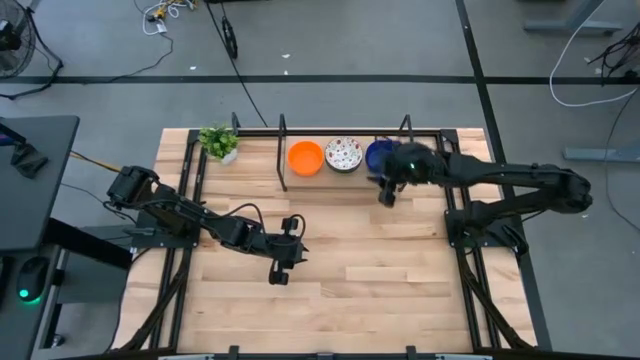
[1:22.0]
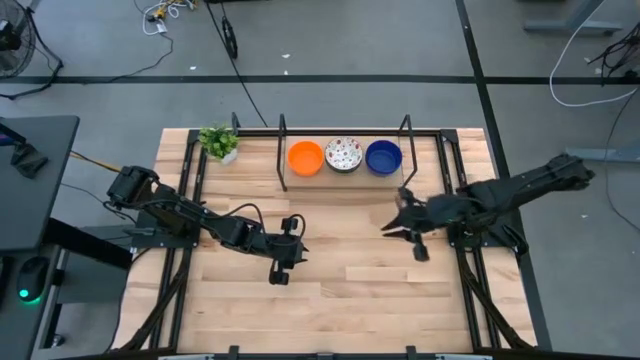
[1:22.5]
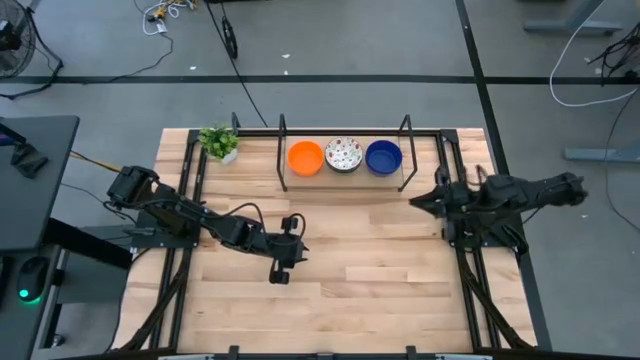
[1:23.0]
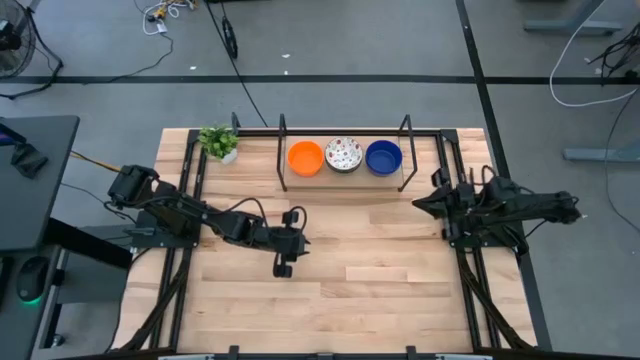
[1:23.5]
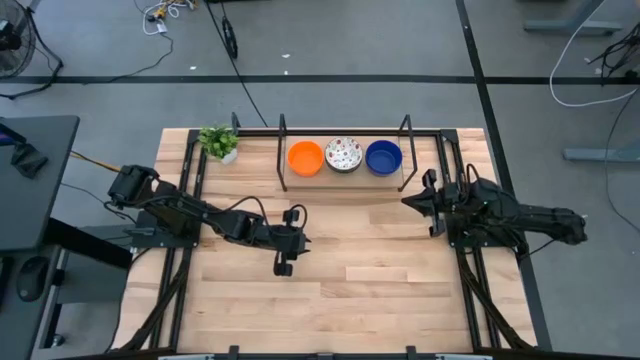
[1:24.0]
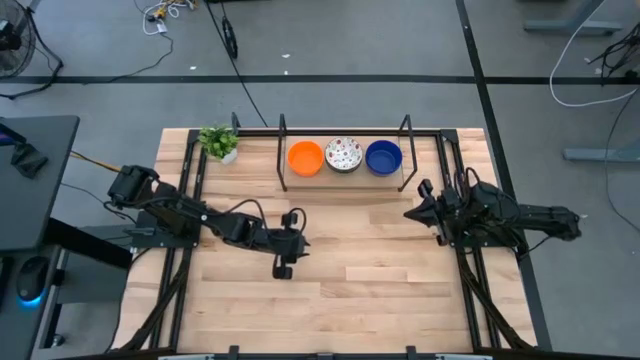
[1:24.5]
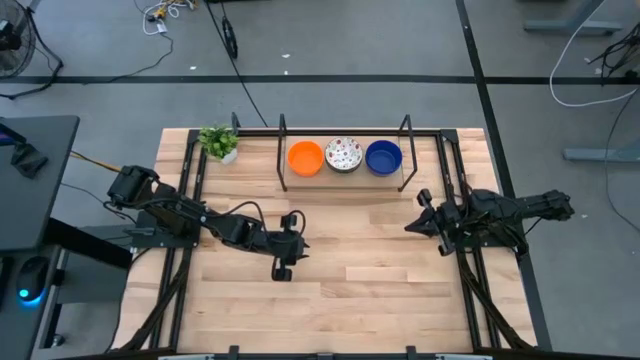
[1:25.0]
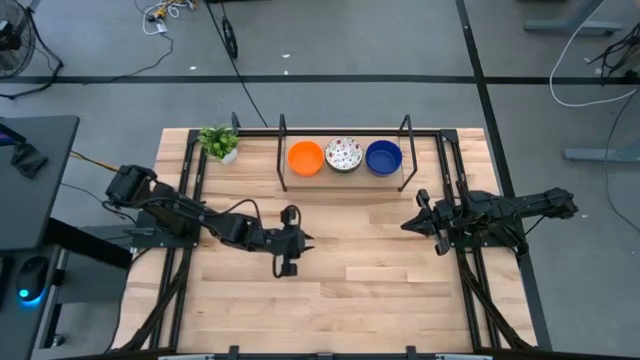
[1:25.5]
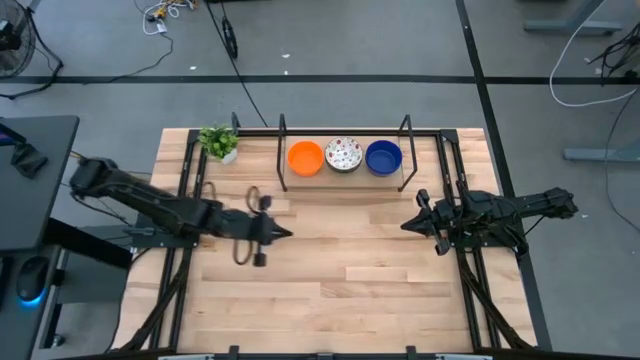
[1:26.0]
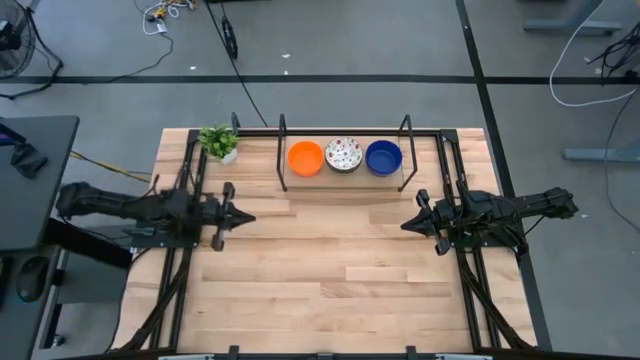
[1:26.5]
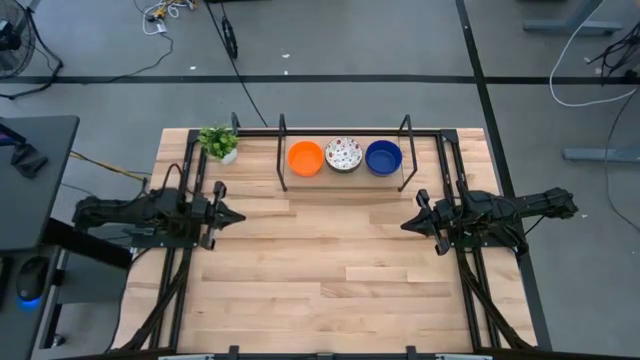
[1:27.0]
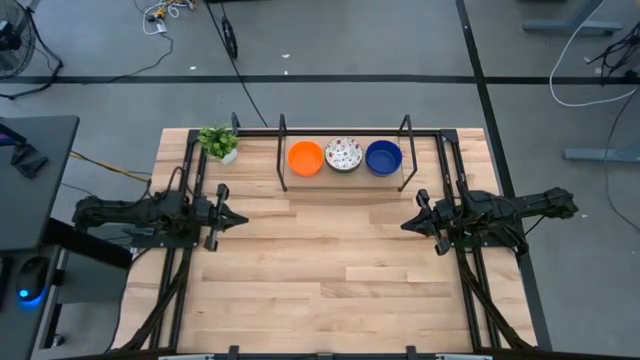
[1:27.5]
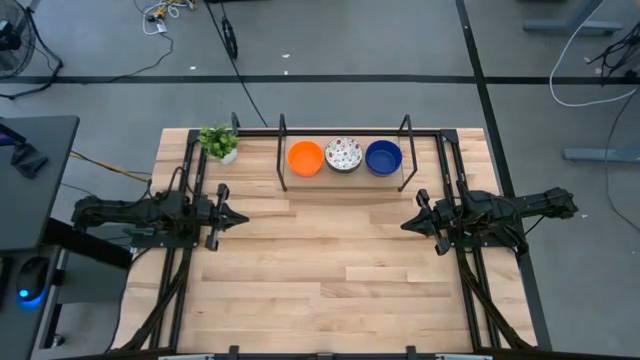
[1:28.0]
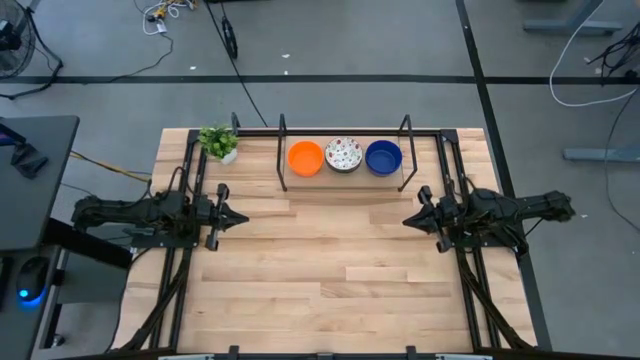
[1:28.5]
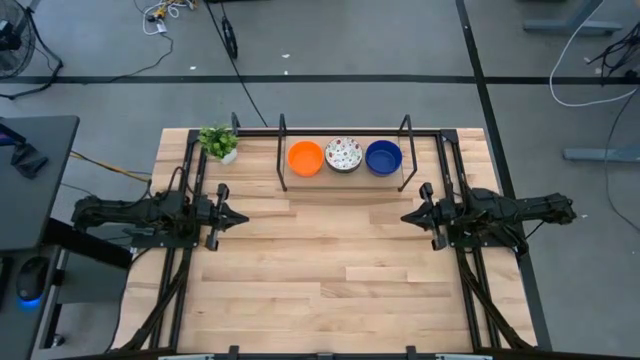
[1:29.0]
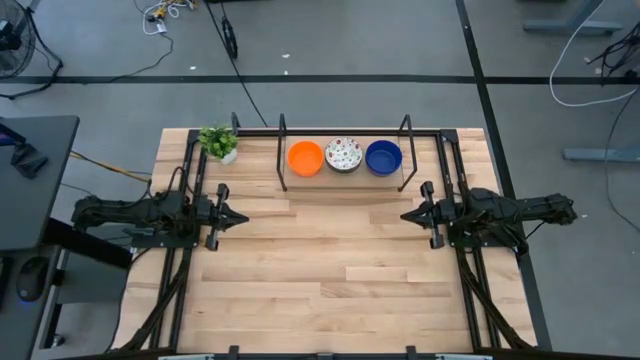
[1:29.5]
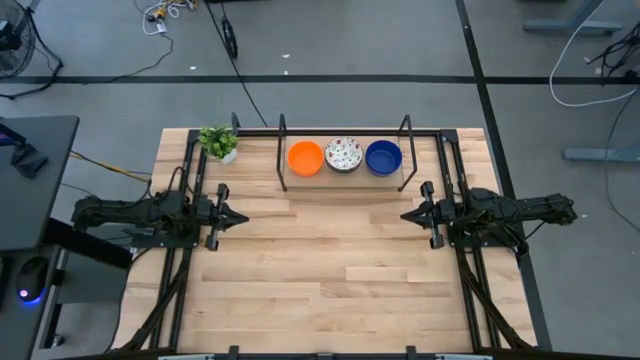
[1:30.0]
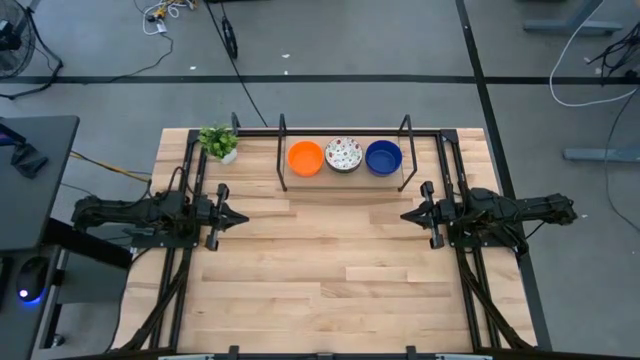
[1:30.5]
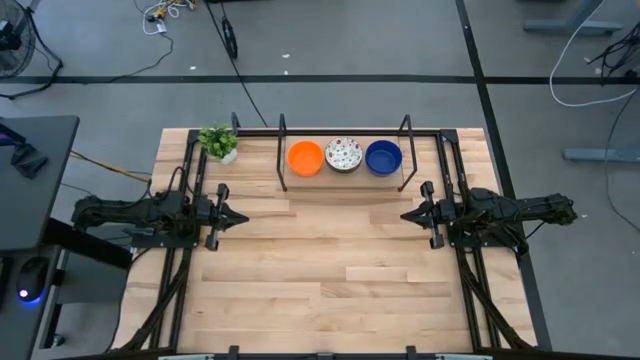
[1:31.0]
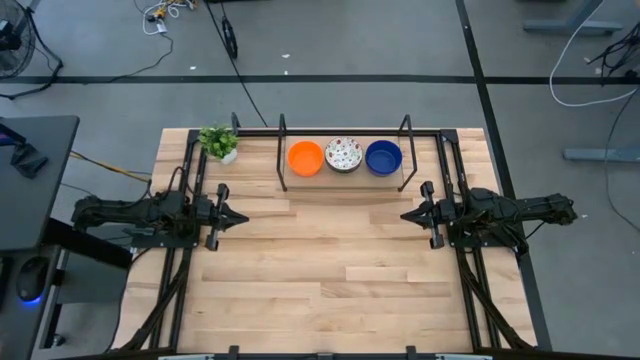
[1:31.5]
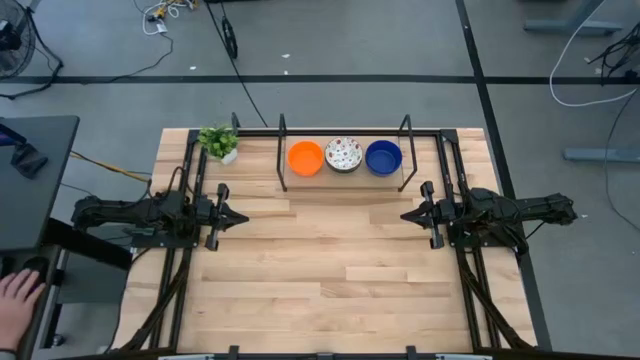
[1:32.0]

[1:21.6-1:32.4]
Task: Pick & Place Mini bowls
Return to Home Position

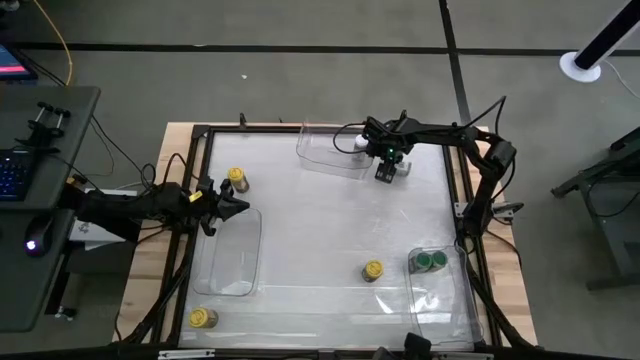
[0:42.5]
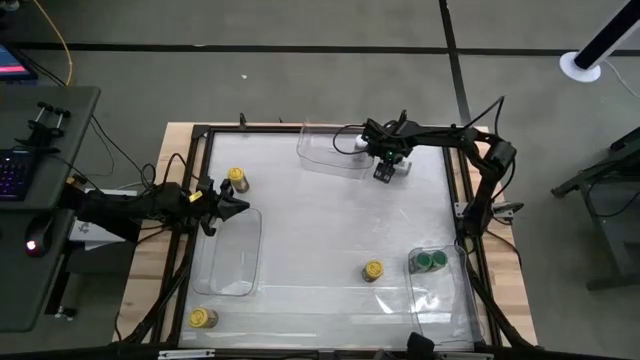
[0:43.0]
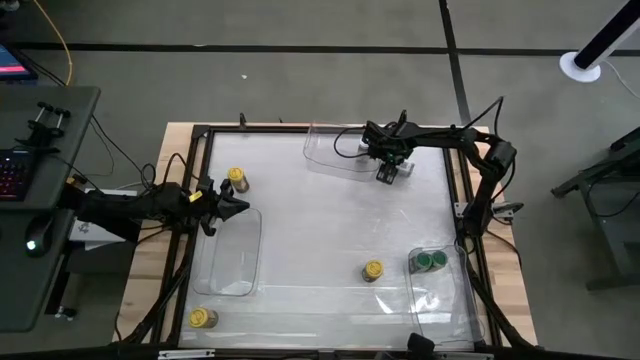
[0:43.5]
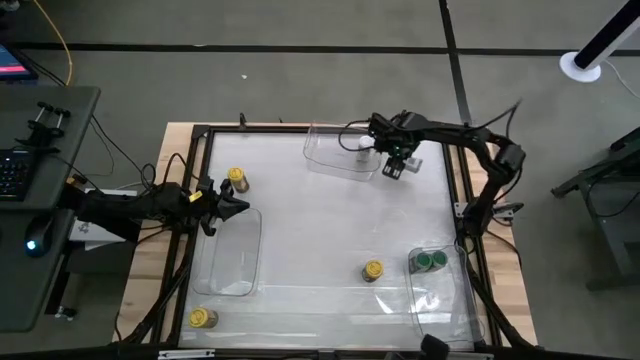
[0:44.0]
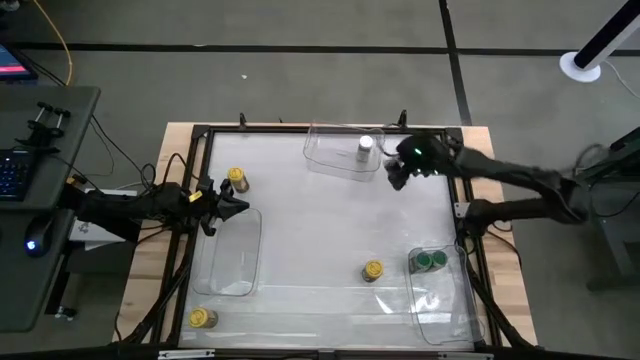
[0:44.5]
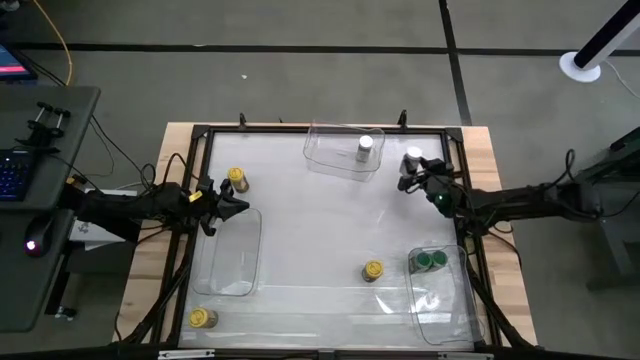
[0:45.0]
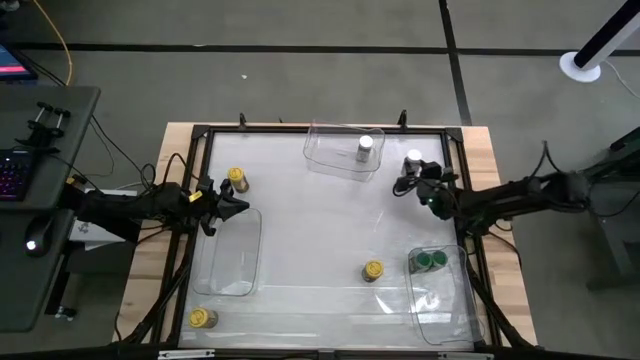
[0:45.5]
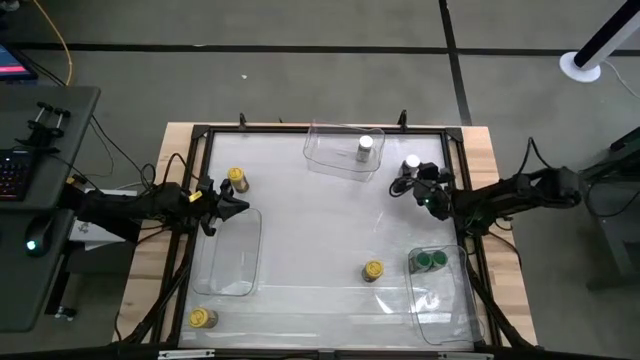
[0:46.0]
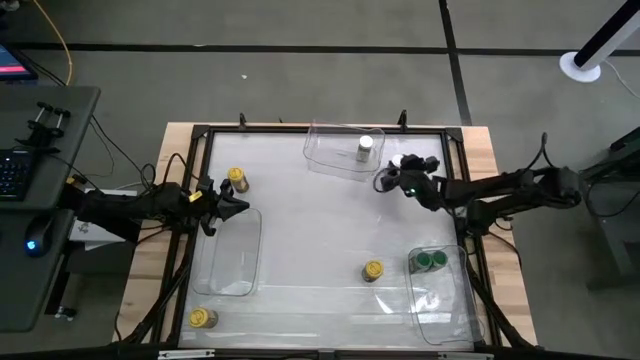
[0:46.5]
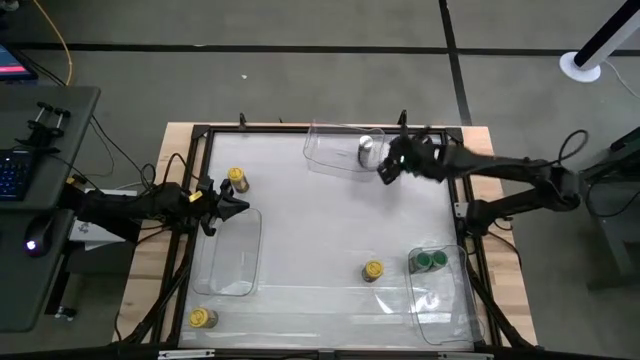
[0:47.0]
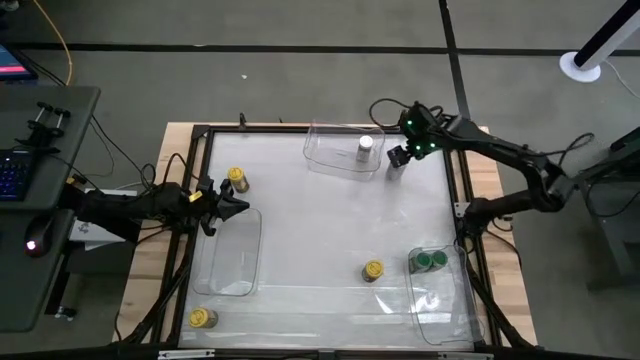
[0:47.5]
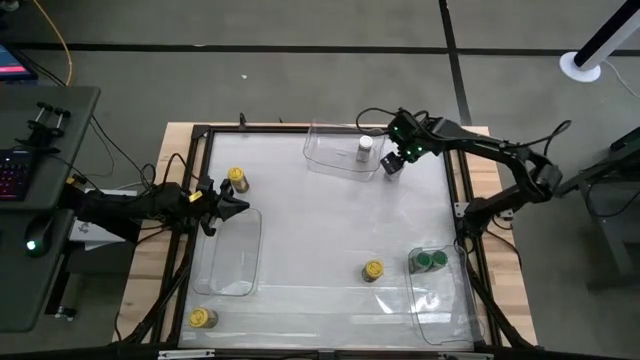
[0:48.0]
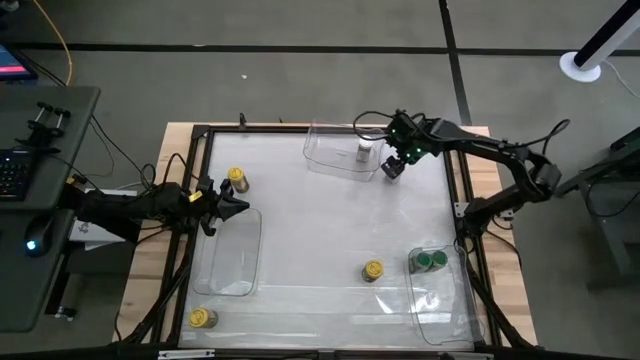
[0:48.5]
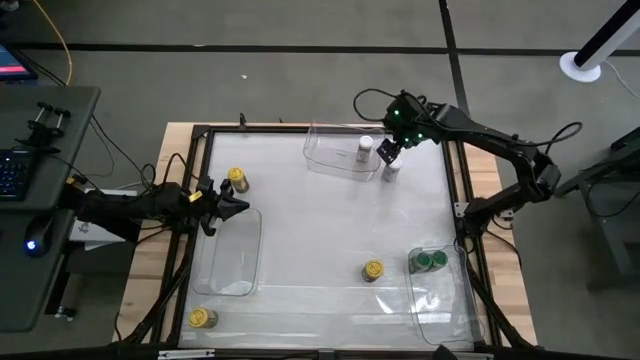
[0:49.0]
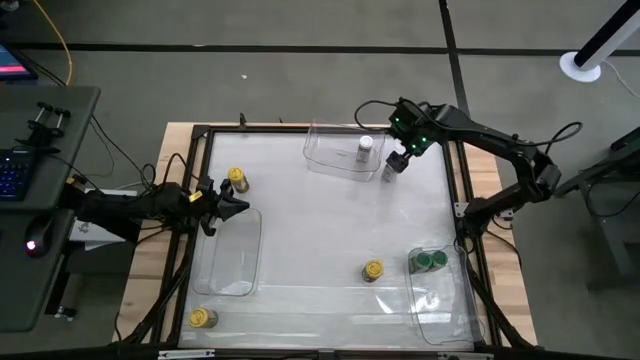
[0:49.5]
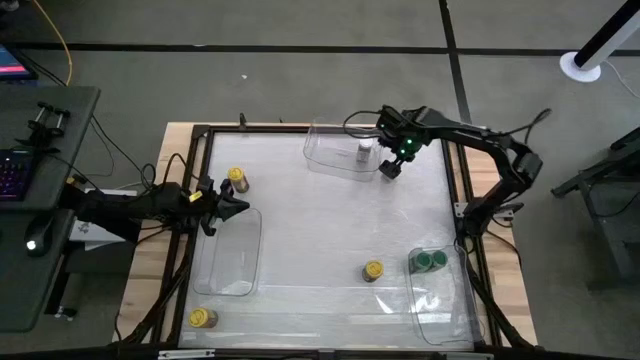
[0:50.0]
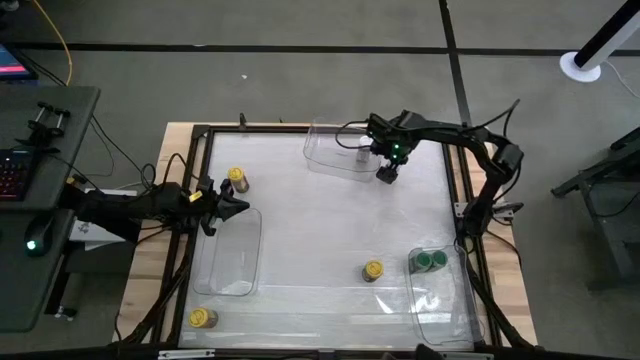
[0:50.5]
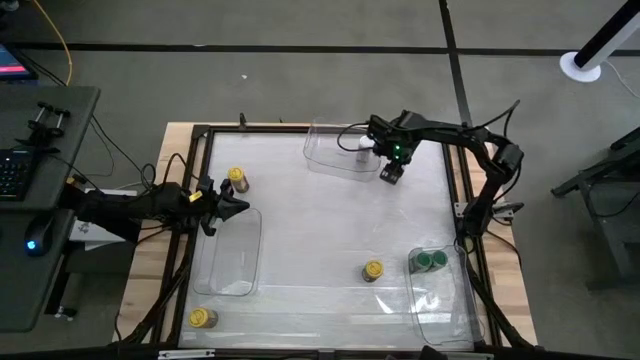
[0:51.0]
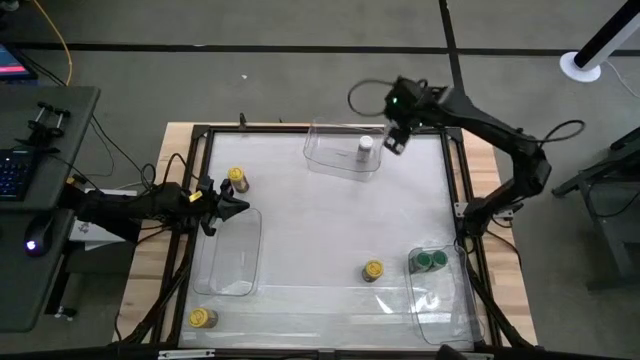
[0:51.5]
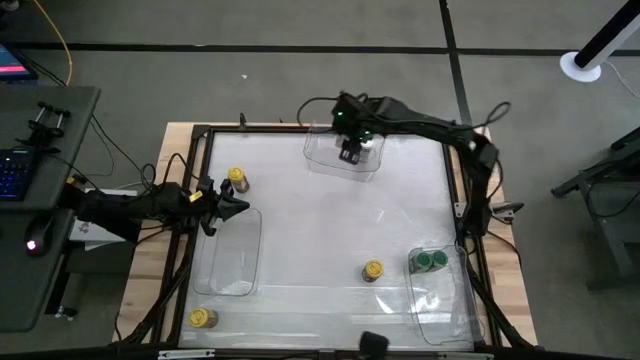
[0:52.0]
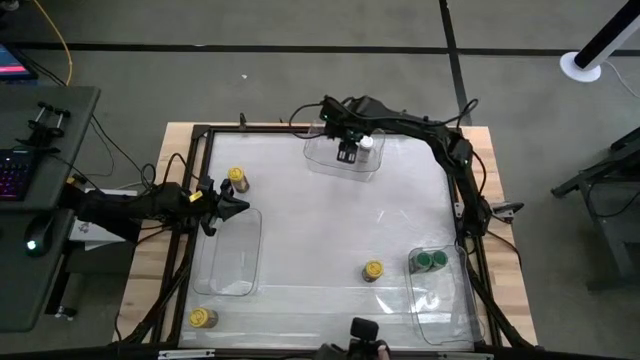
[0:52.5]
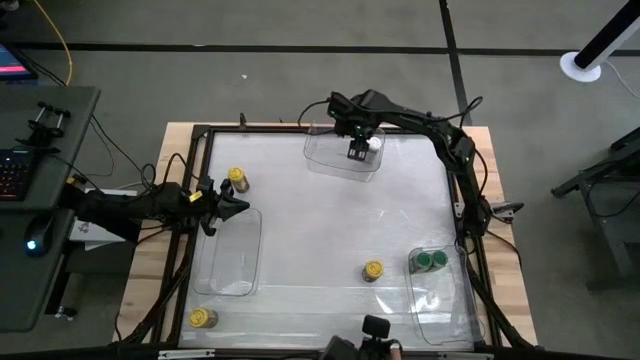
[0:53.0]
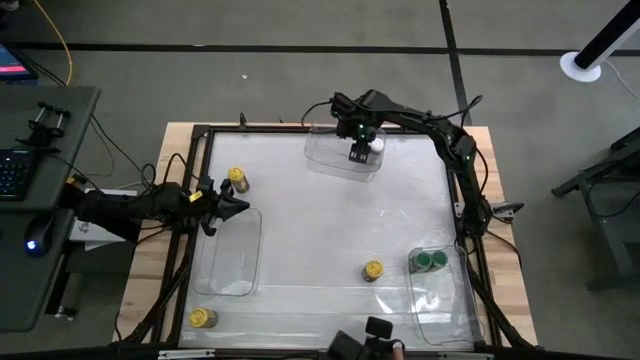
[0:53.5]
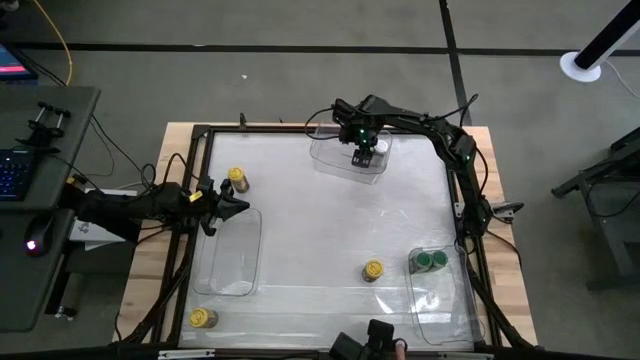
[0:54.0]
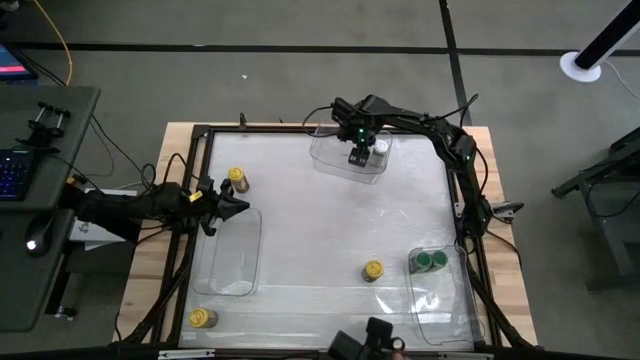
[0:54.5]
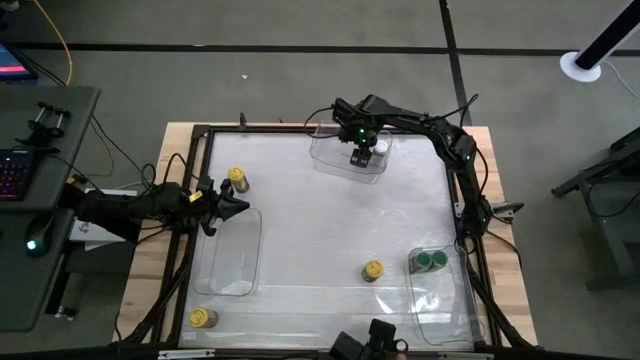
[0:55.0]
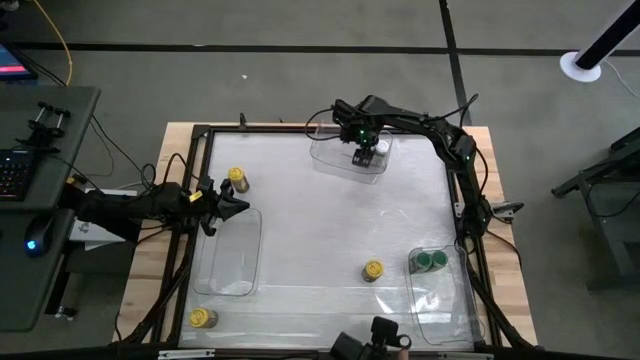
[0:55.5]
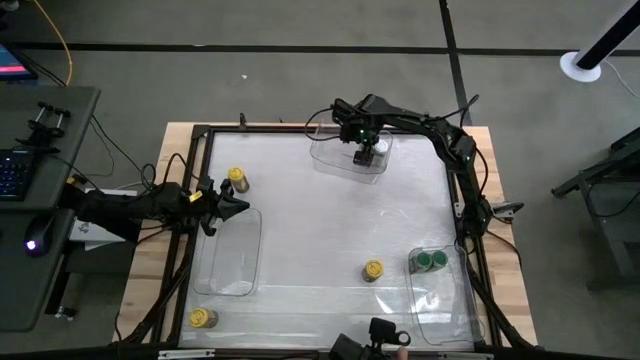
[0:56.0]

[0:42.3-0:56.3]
Task: Sort spices by type
Put the white seasoning bottle into the top transparent bin
